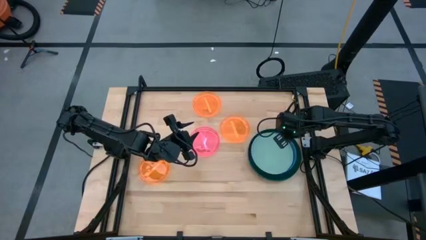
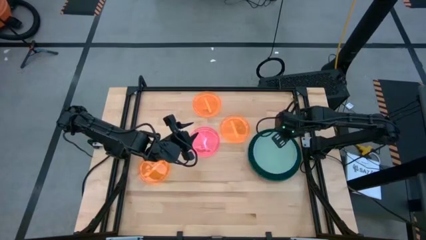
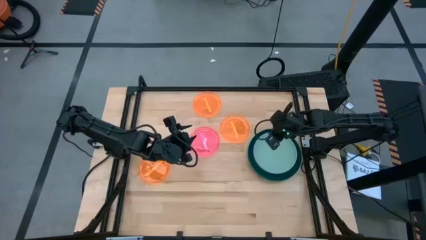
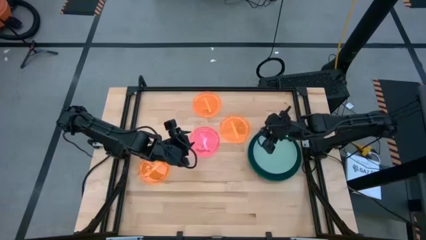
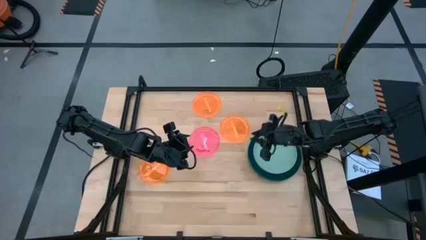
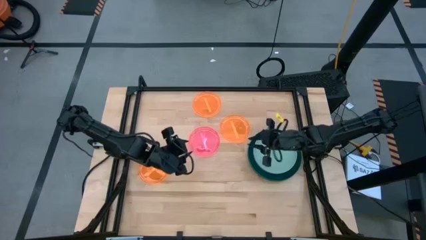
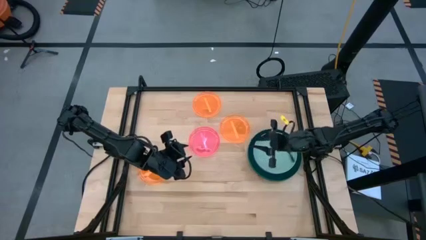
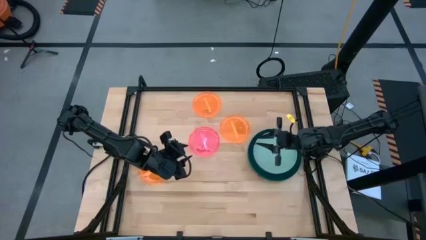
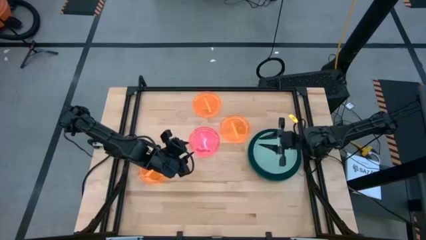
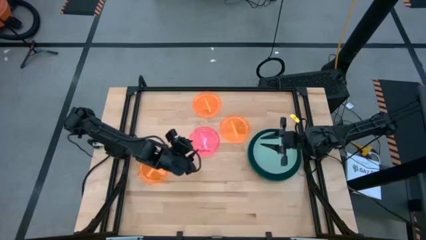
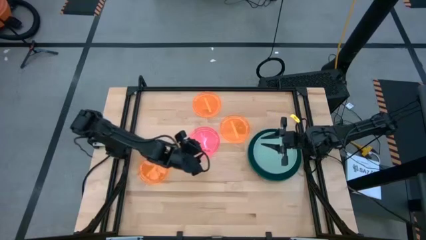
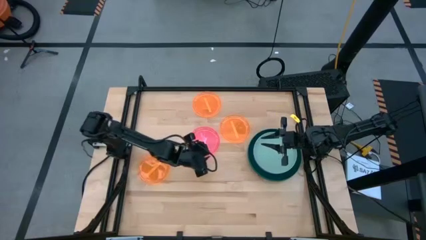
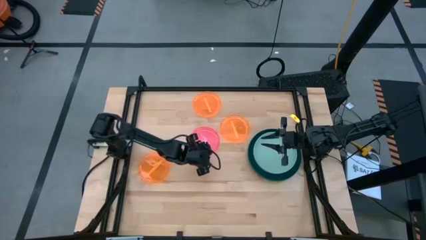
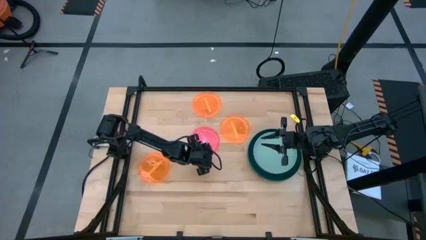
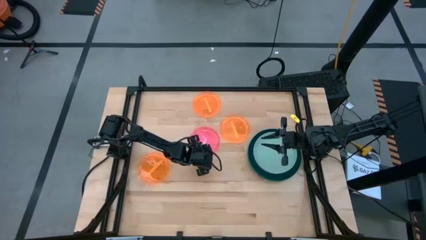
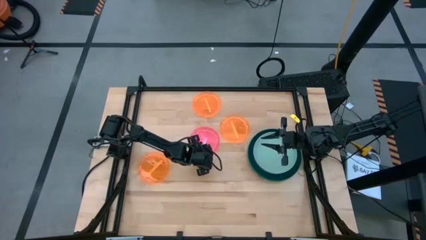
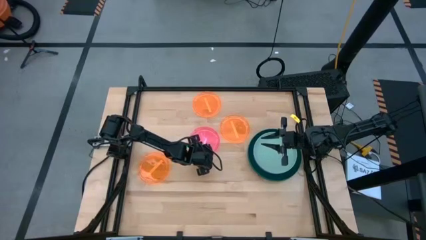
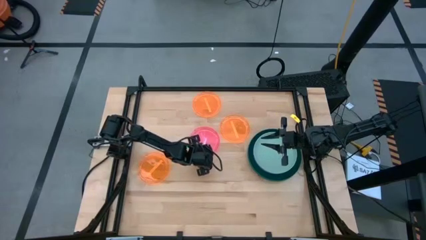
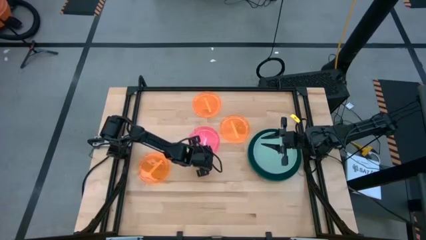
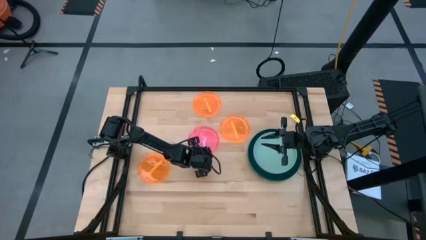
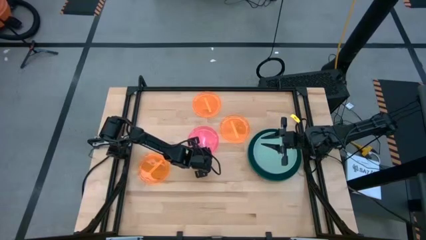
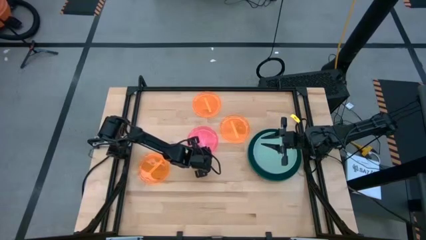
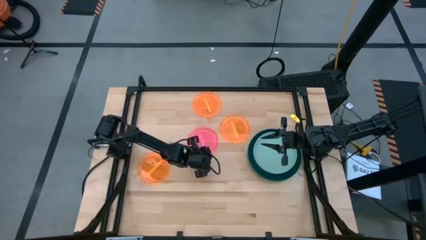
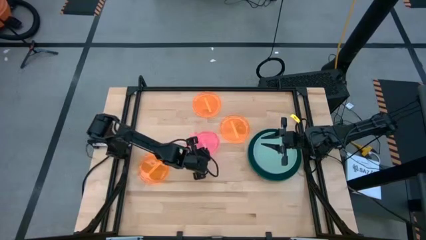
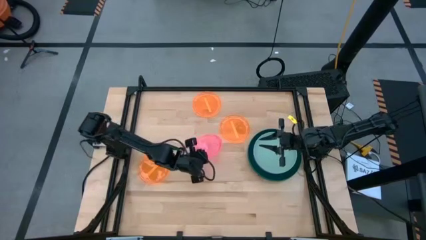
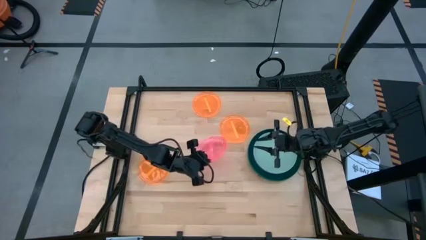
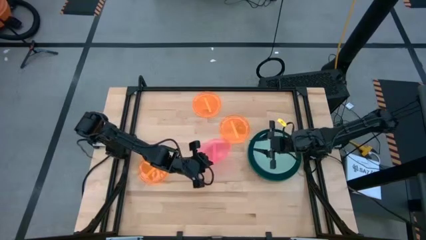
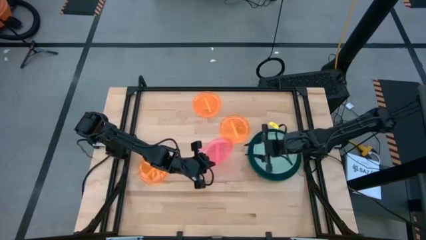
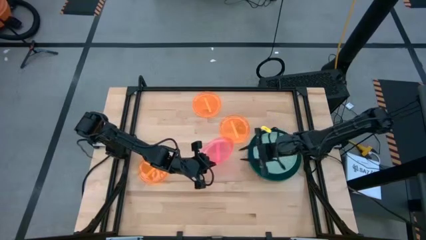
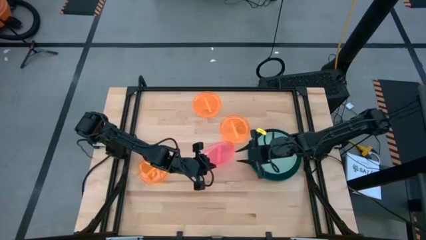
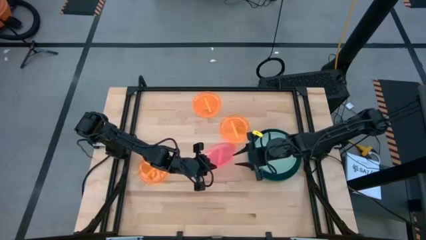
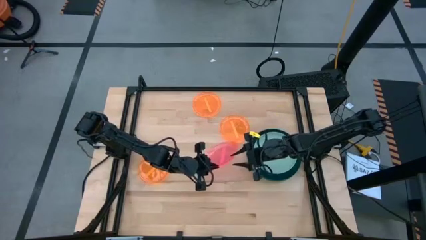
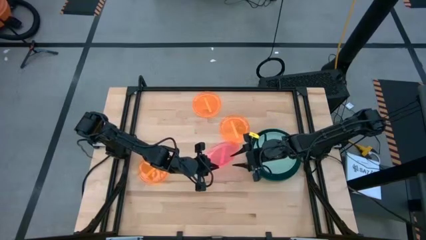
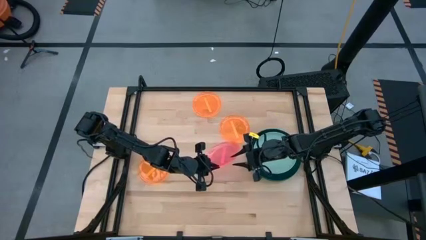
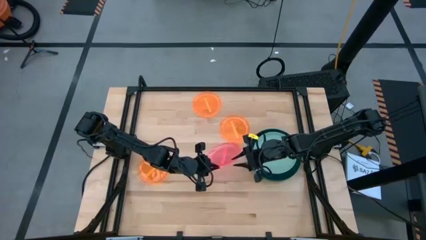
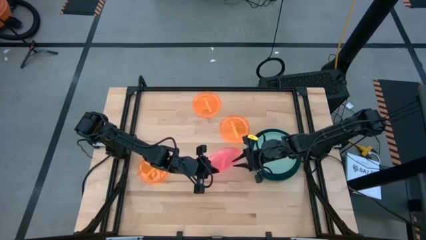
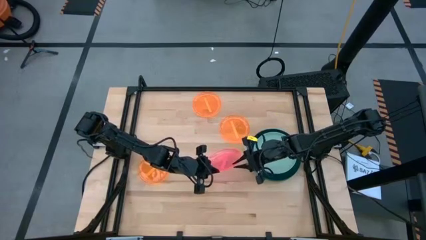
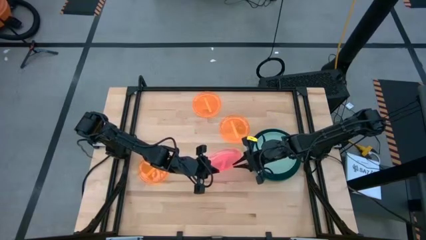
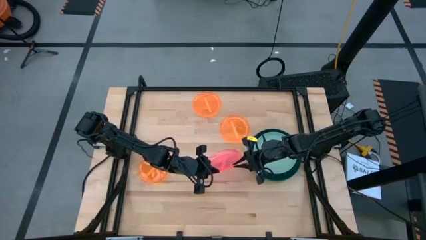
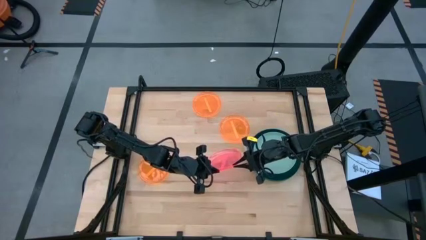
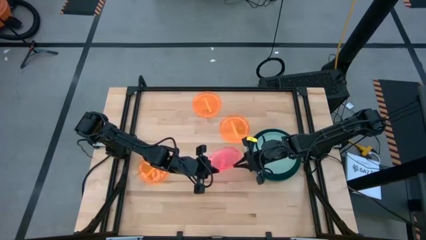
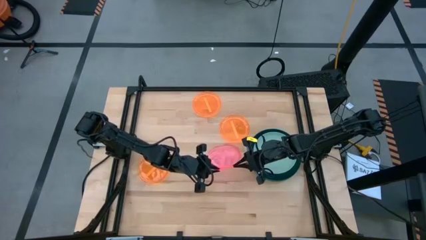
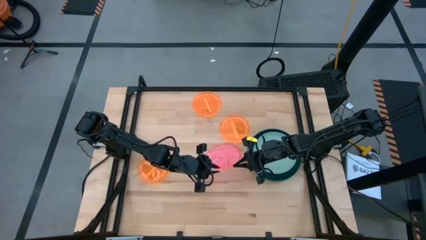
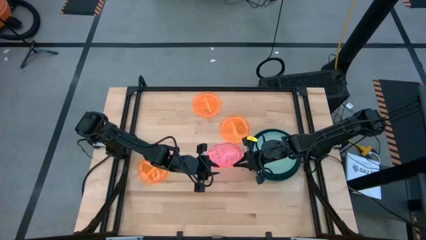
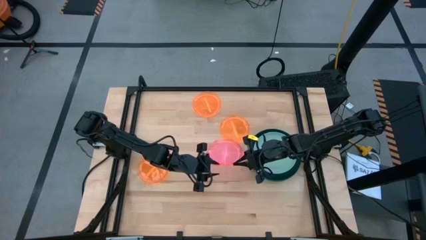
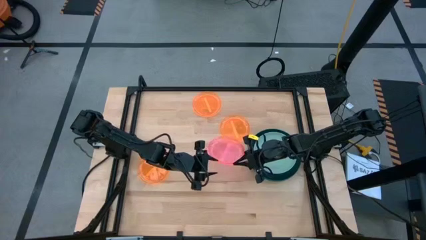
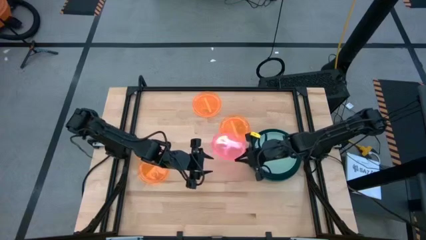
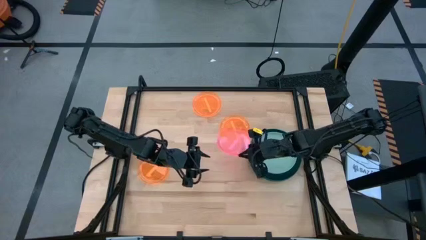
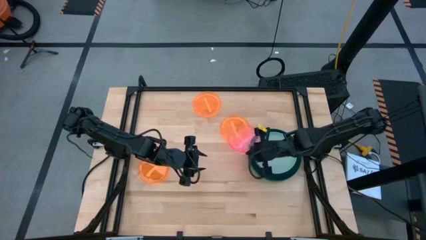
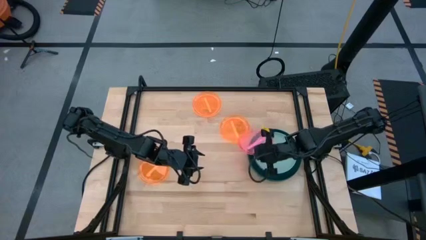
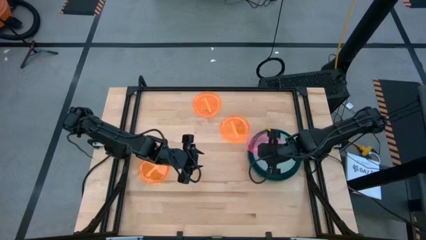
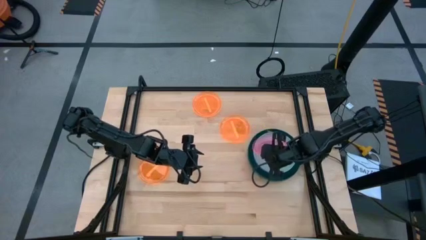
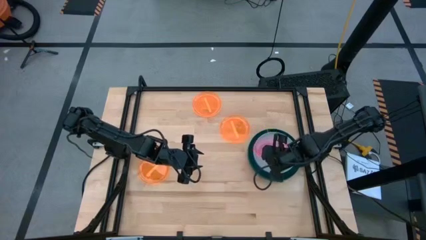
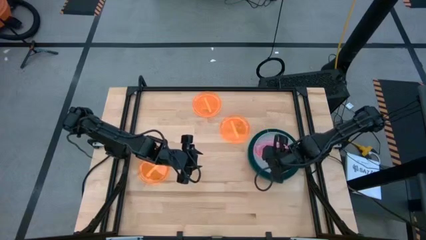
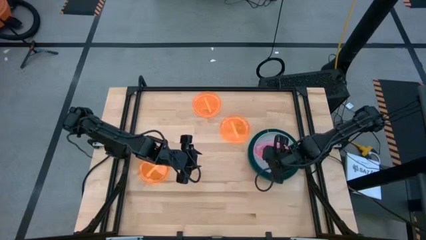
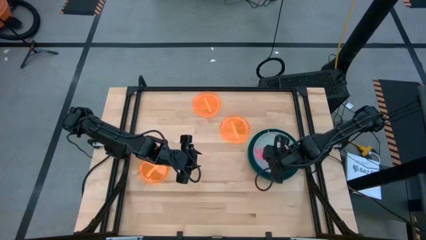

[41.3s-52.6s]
Task: Stack plastic plates
Stack the pink plate on top of the light green plate

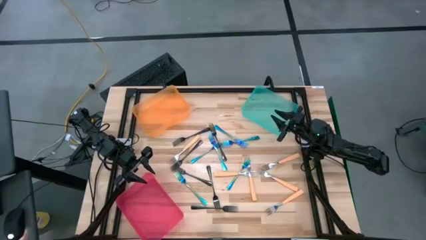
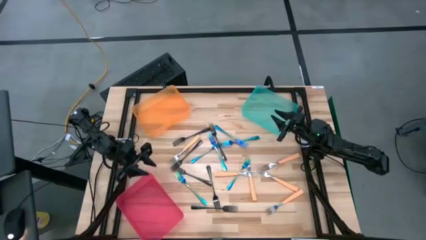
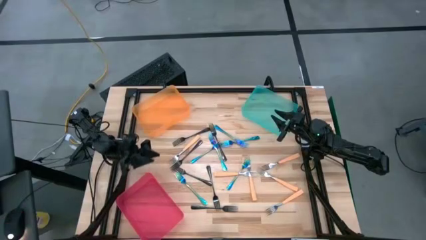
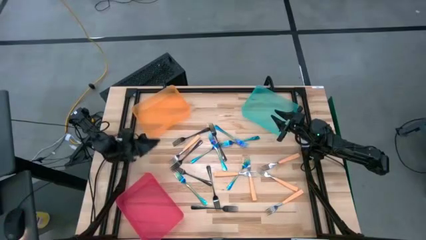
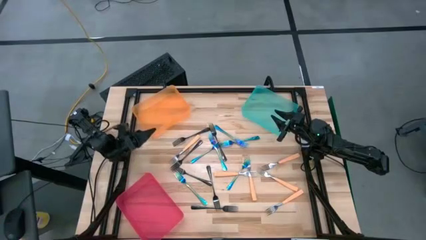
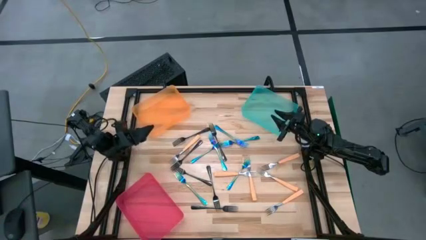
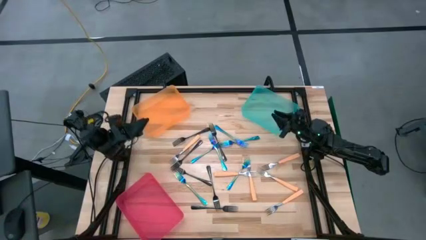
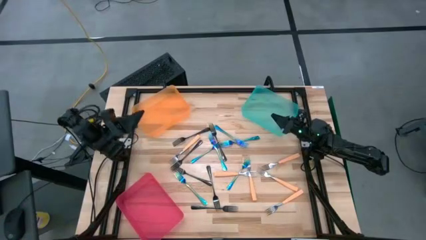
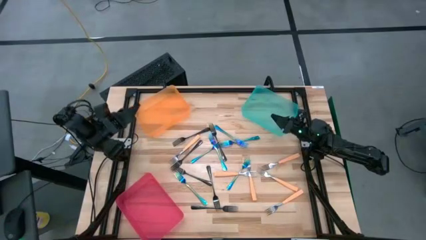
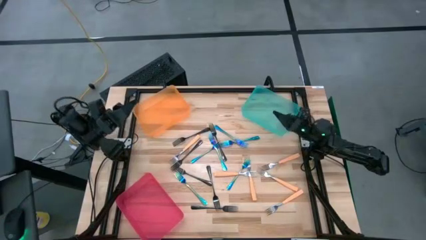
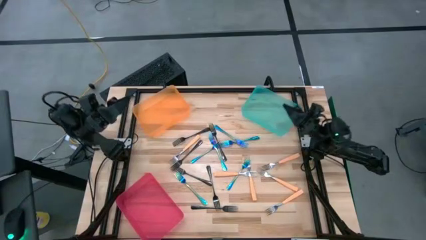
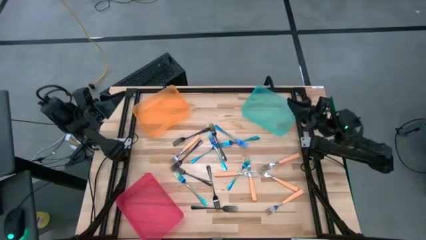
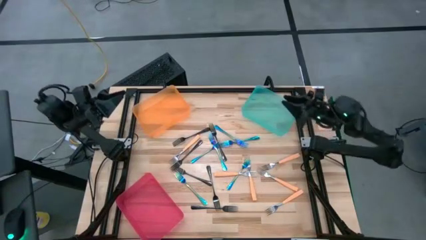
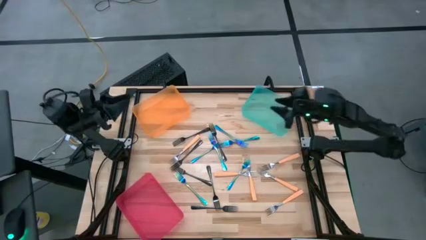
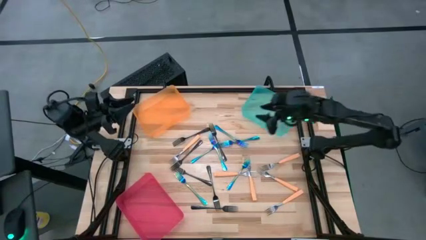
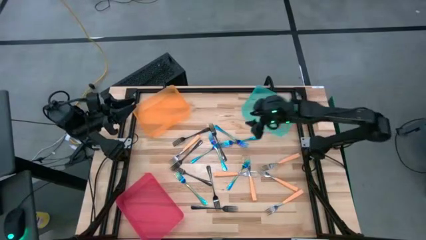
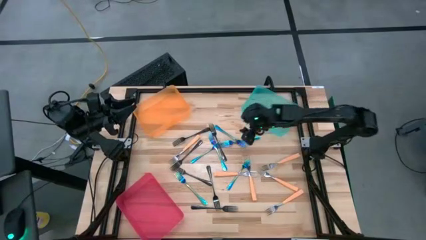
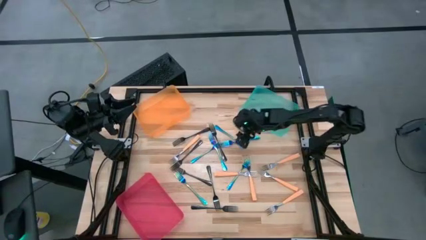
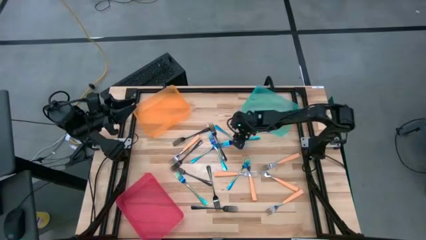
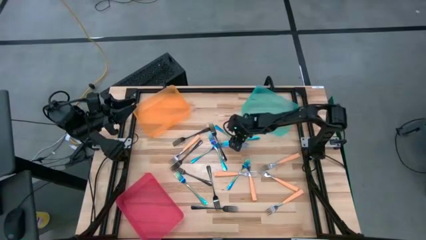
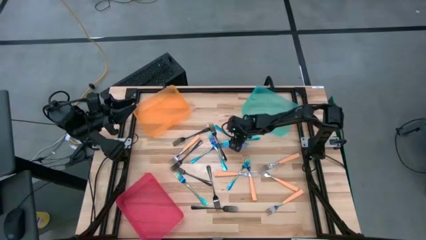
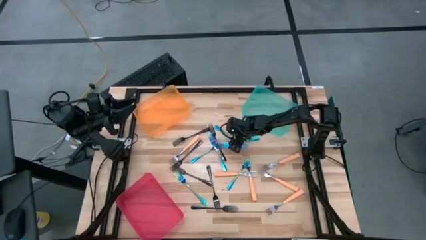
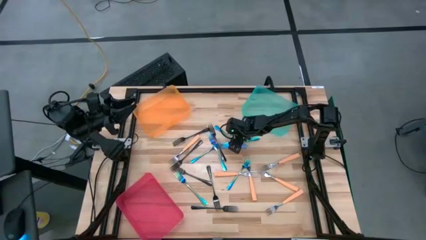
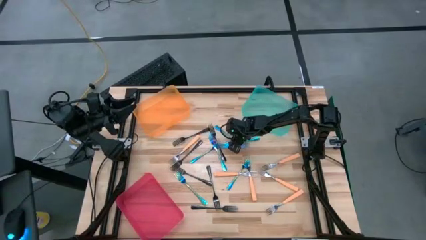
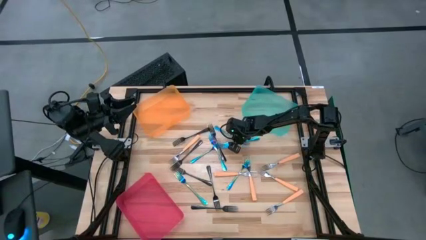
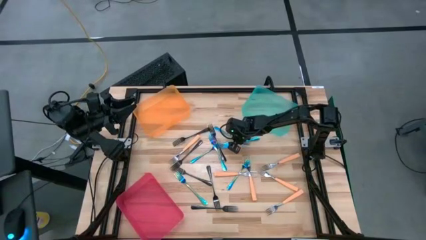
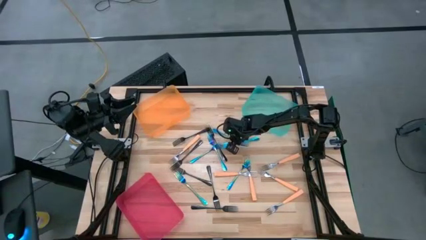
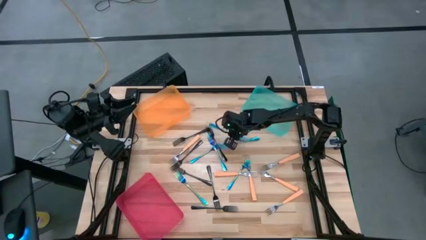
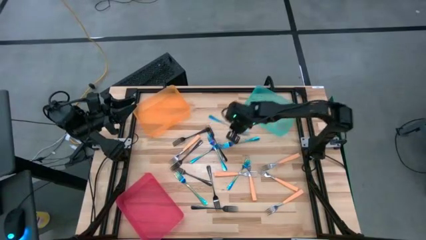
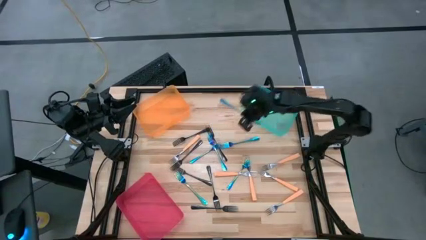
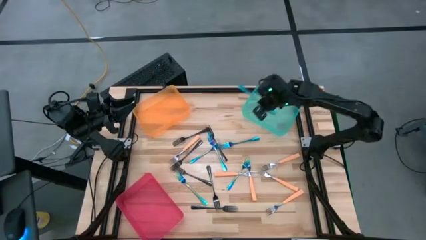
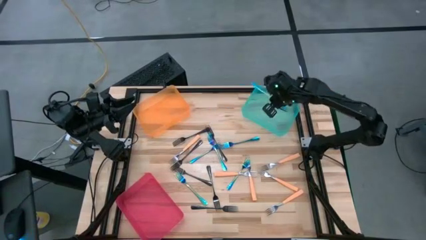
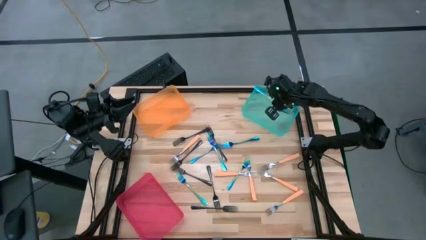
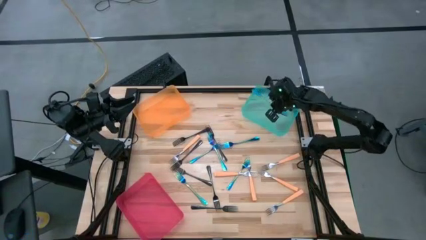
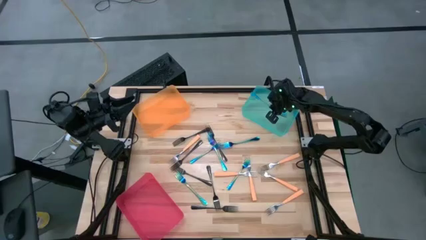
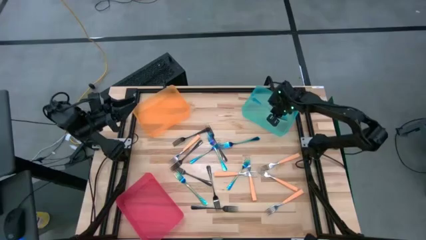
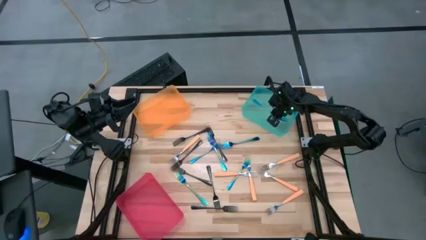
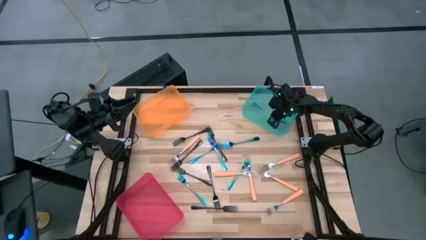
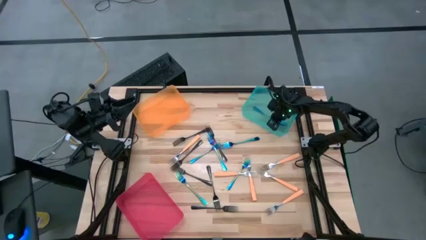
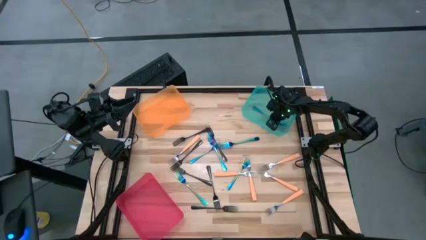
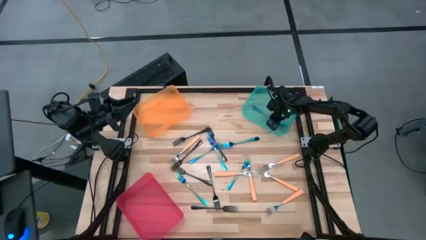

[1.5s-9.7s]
Task: Sort silverware by color (type)
Put the iridescent fork into the green bin
